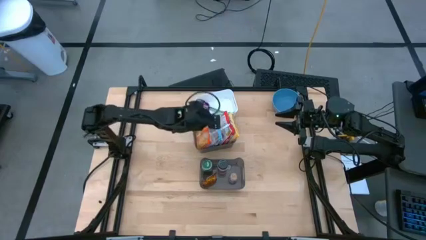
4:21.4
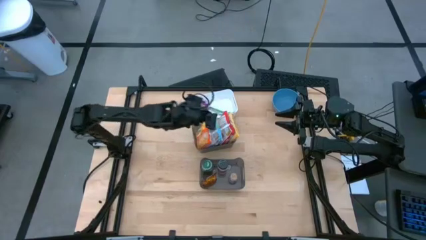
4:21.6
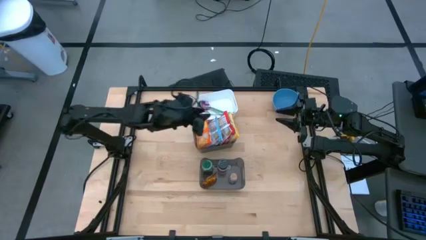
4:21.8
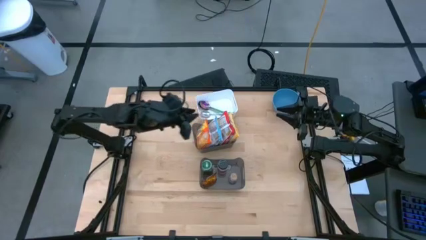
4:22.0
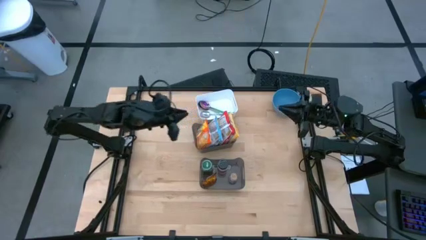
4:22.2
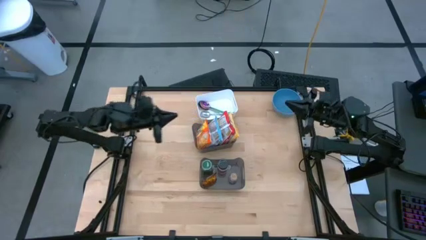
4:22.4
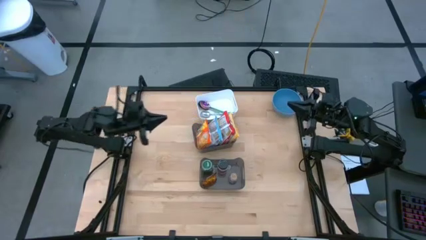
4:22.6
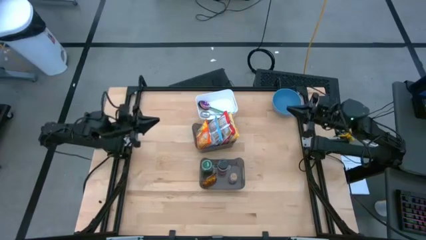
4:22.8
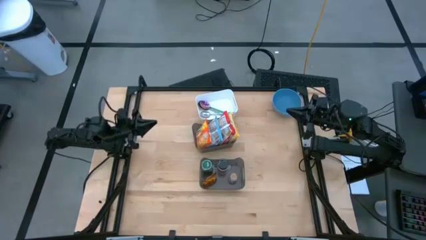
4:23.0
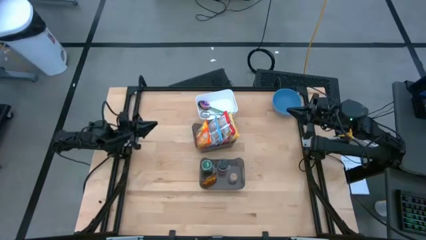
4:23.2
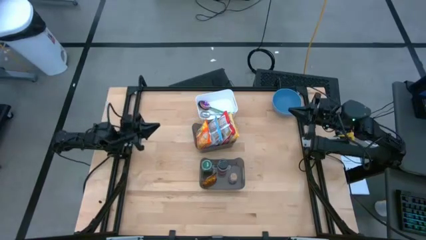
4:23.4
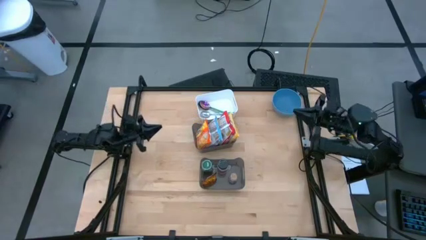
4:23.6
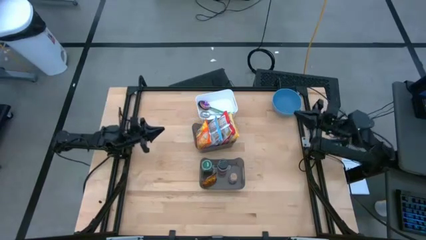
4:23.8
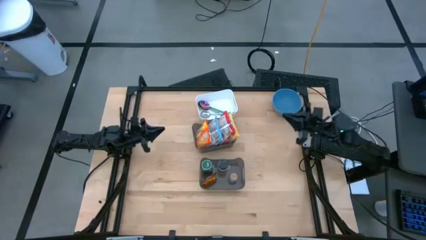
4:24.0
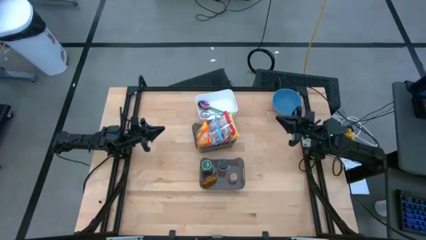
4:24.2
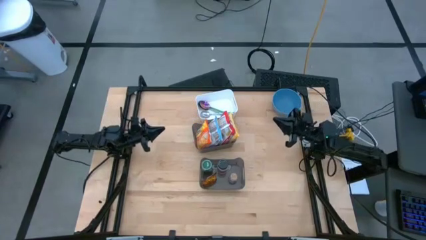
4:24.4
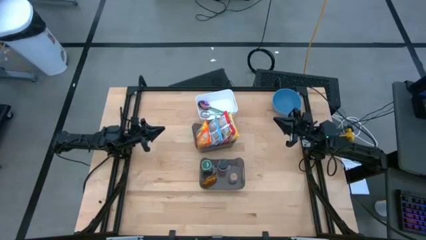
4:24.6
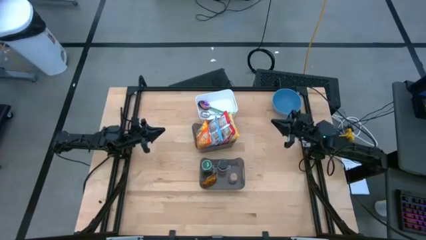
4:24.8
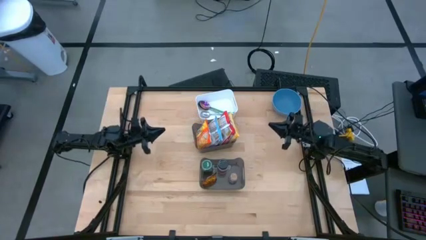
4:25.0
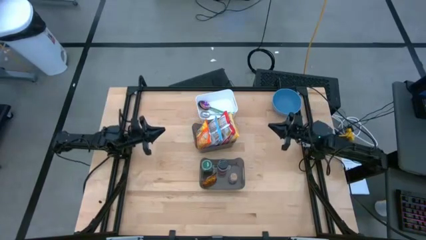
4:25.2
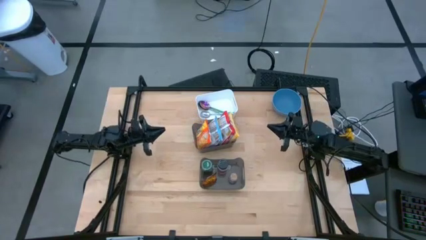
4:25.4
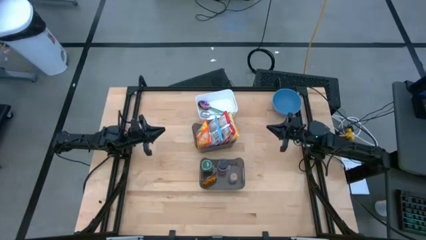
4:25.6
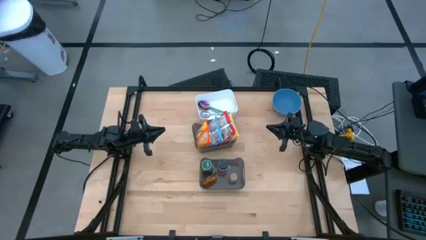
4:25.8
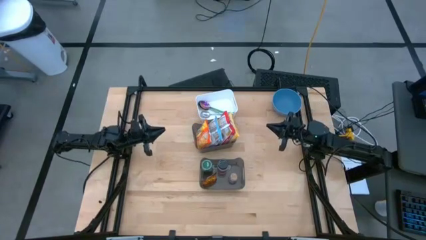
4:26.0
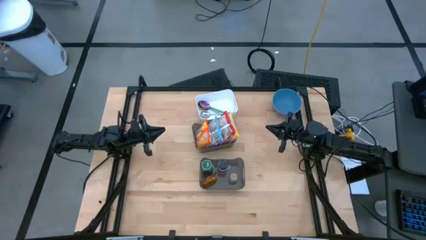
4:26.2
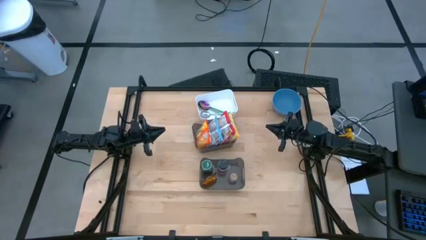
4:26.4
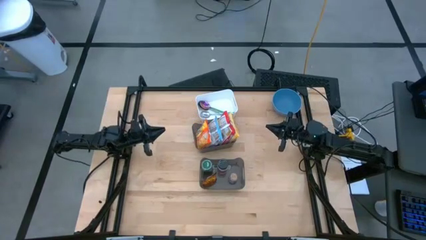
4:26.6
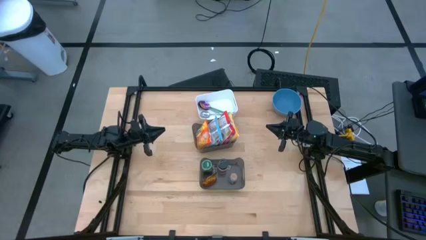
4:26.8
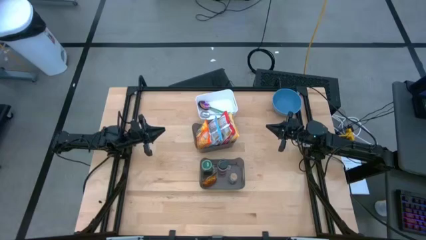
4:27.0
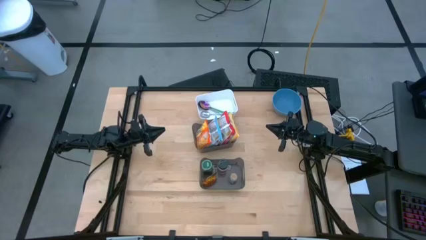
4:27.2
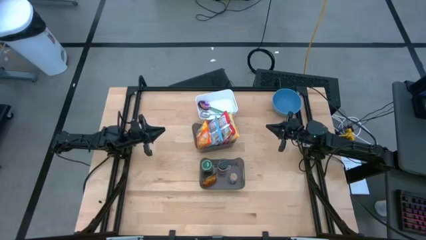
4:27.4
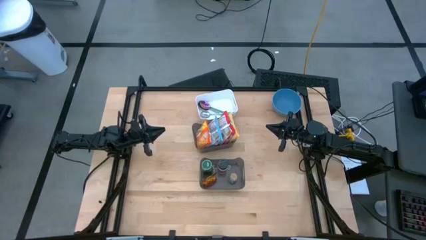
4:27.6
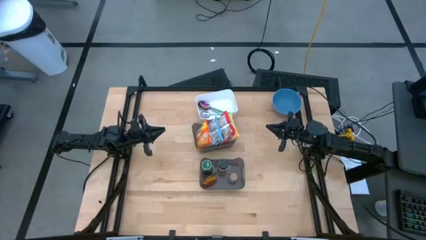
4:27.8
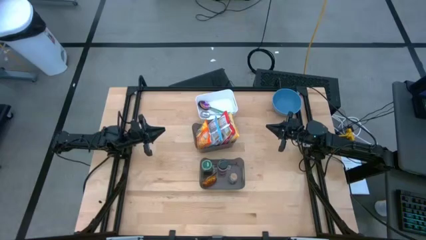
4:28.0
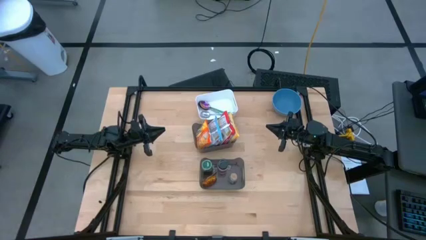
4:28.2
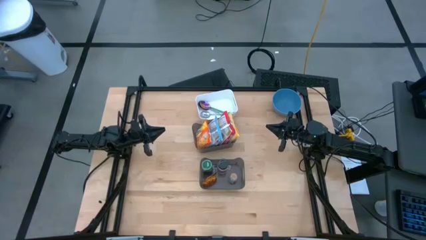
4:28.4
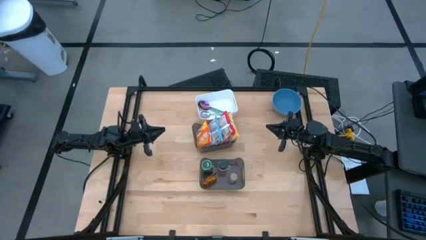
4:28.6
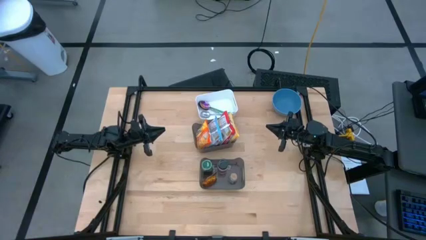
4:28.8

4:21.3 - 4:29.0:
Task: Pick & Place Food Item
Return to Home Position

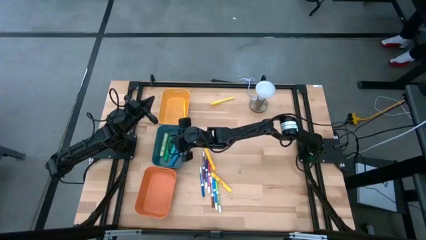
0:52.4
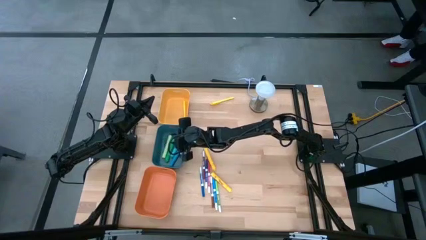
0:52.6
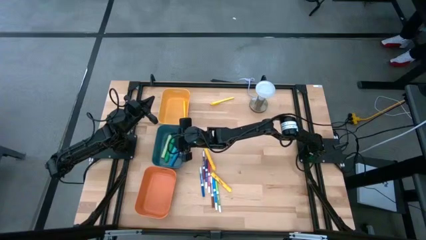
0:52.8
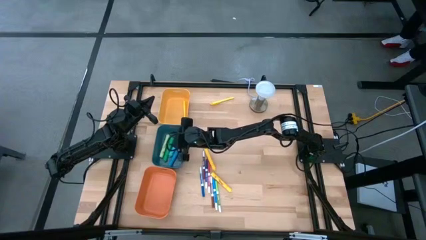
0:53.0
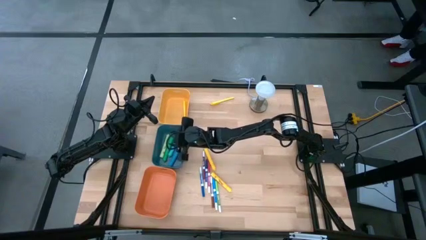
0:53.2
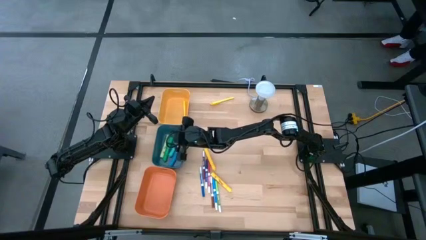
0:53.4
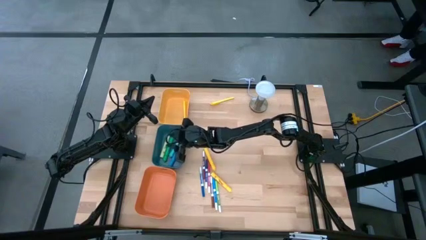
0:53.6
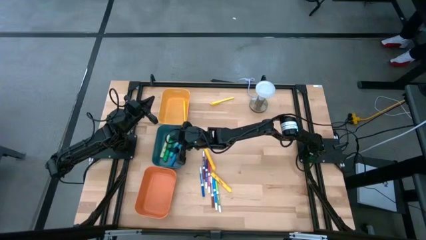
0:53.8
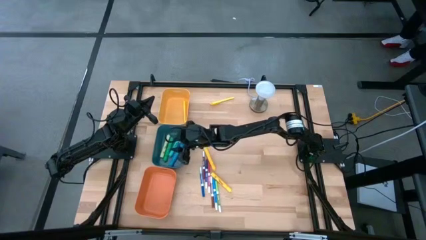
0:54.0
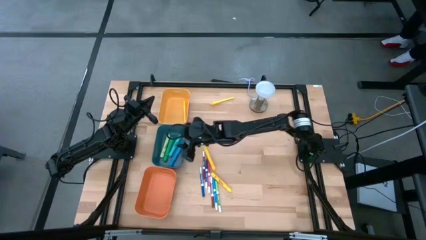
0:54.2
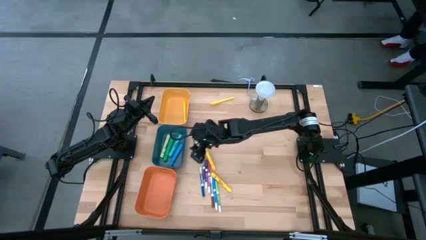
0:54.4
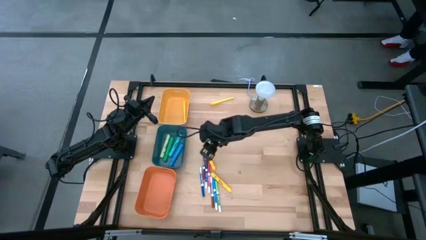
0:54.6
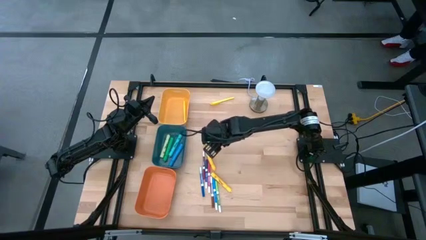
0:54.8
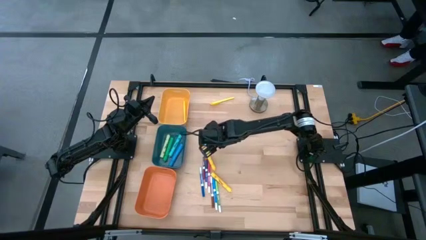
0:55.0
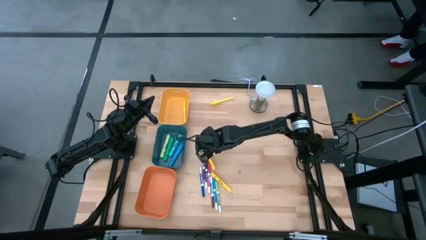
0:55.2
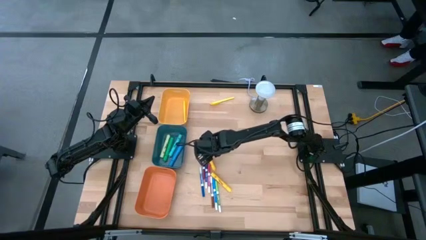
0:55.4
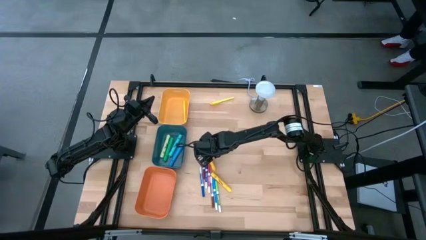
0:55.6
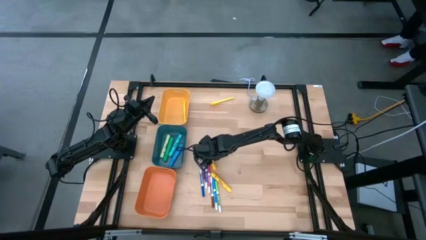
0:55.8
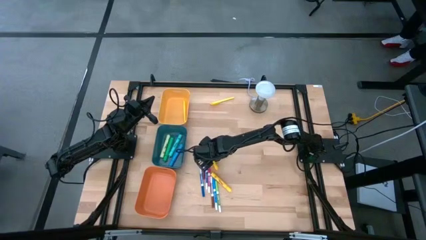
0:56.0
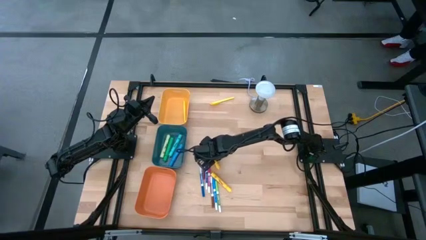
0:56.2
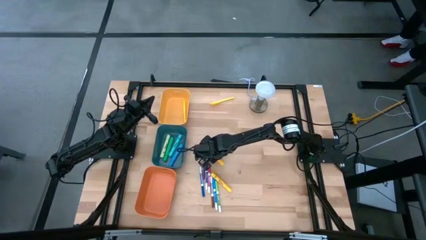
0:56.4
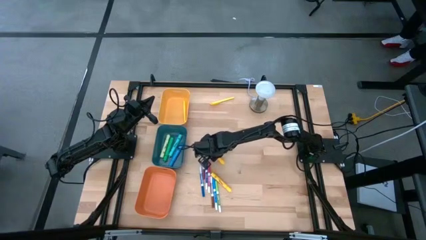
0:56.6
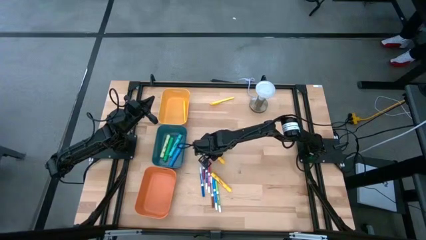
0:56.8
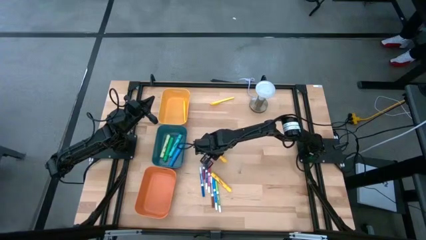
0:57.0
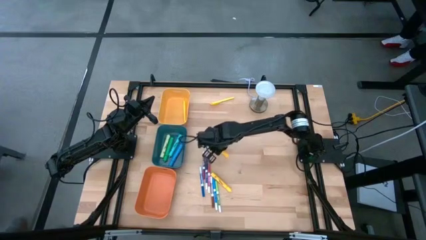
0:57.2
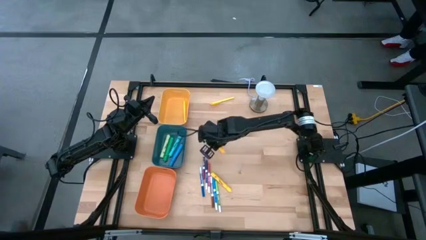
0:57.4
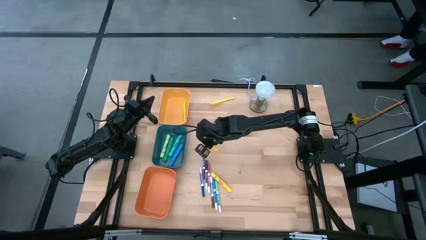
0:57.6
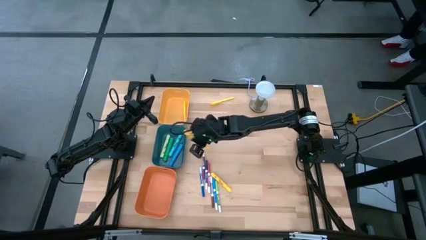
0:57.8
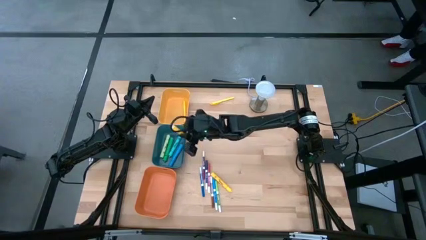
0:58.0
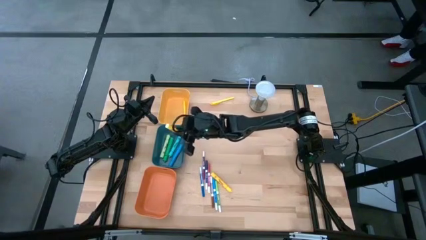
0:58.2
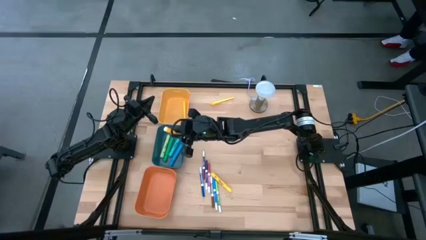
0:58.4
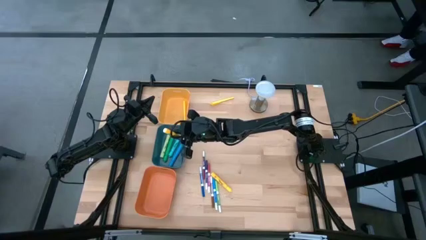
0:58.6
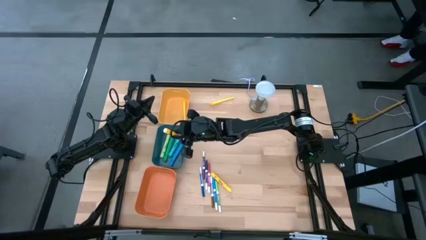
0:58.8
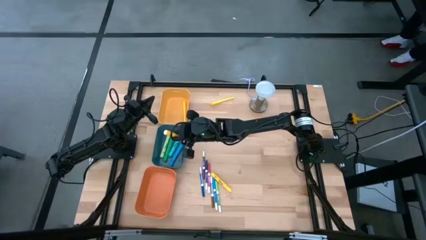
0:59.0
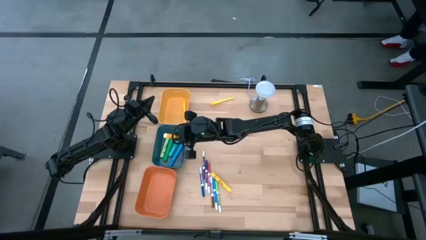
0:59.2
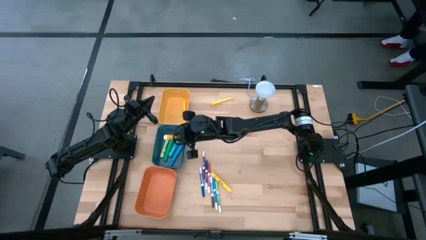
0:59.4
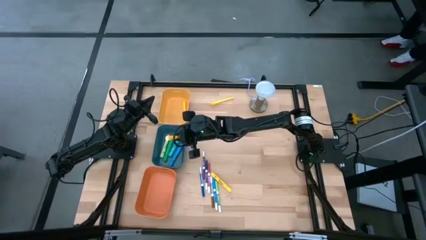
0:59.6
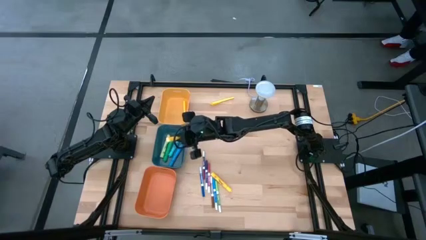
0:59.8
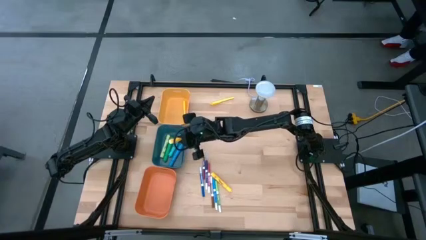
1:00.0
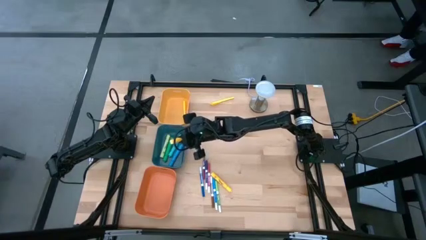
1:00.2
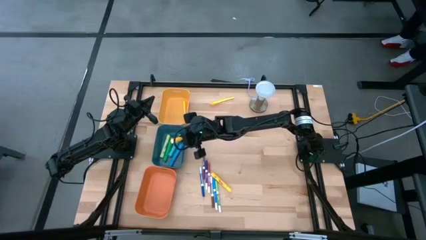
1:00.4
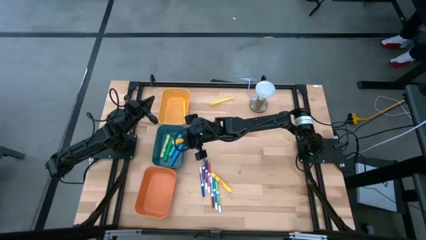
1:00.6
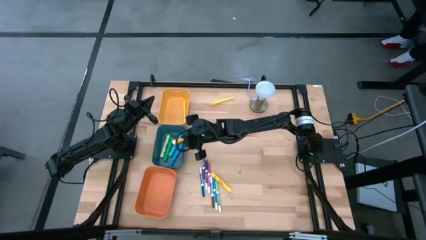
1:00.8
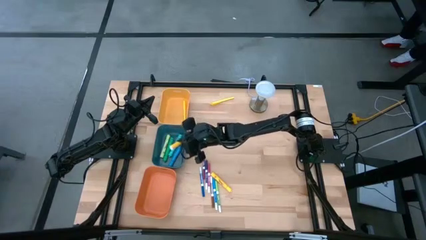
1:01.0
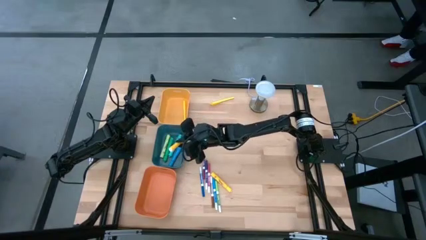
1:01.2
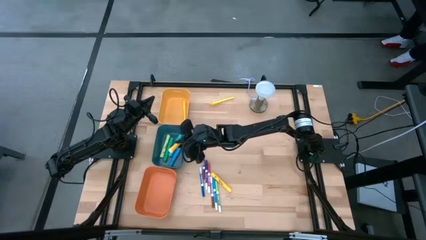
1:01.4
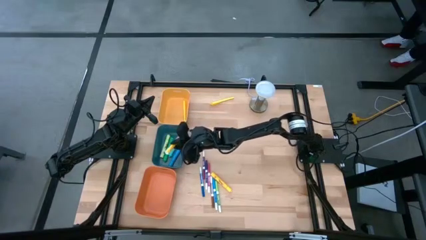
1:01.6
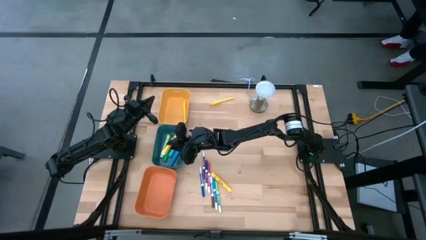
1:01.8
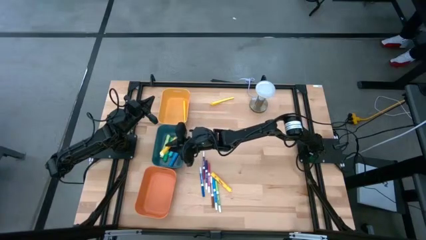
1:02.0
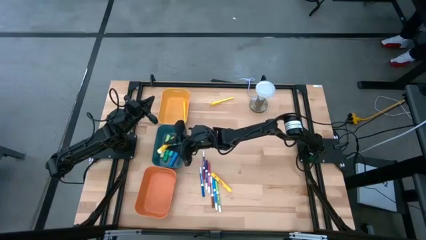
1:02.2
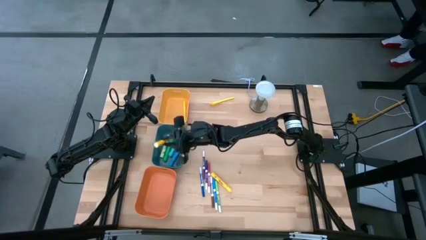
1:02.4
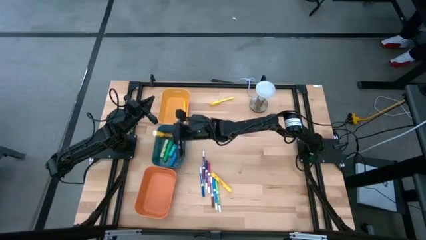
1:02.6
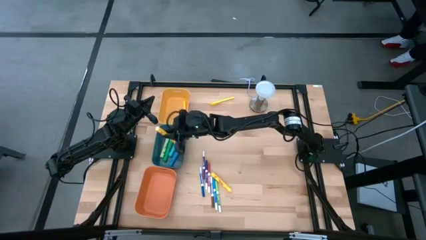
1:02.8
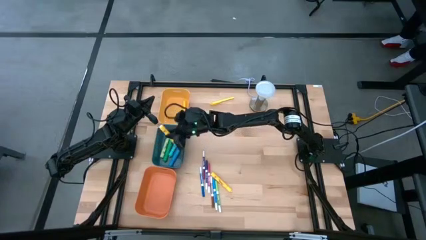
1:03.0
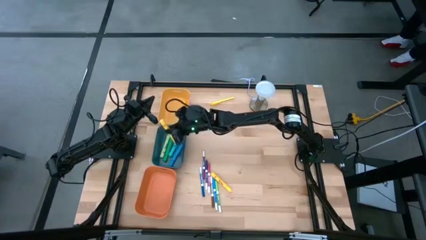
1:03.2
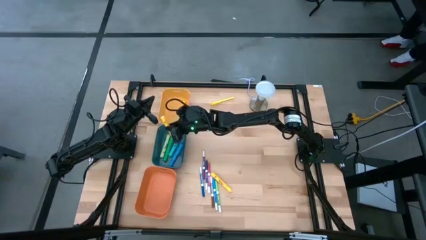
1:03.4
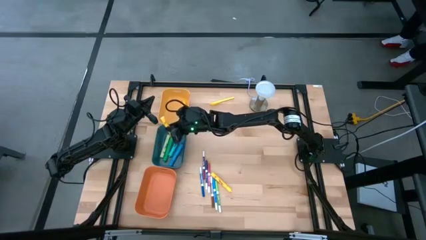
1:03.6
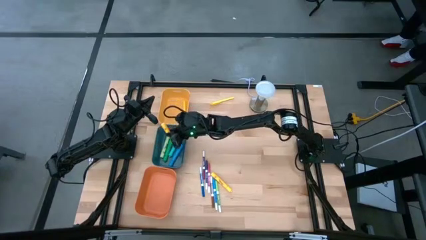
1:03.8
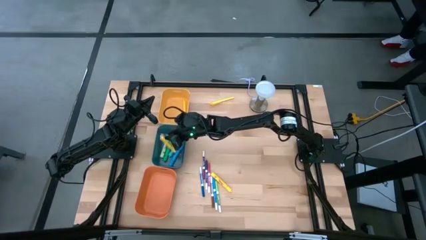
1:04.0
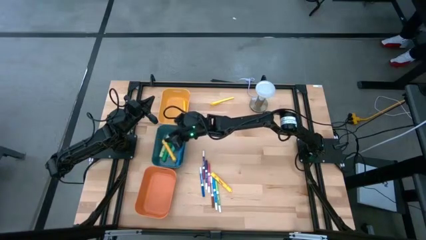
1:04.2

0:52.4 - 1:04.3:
Task: Pick & Place Markers
Put the top yellow highlighter pen into the blue bin
